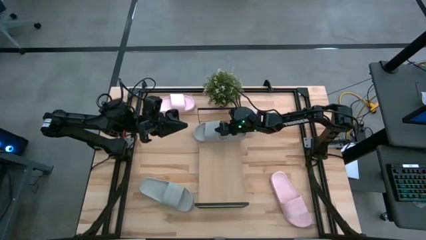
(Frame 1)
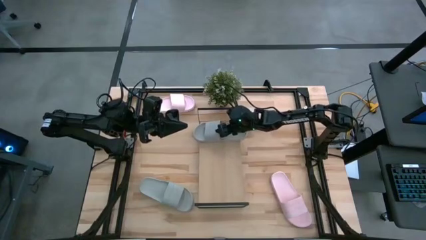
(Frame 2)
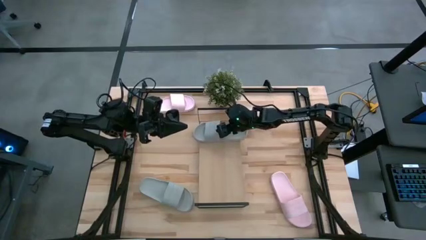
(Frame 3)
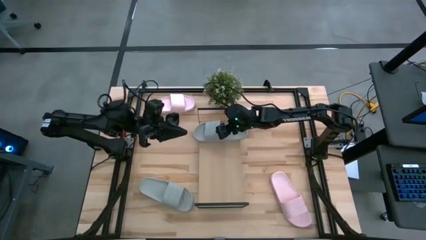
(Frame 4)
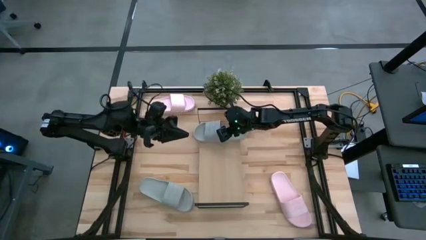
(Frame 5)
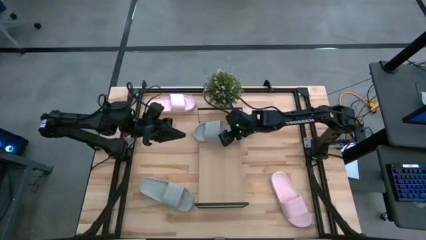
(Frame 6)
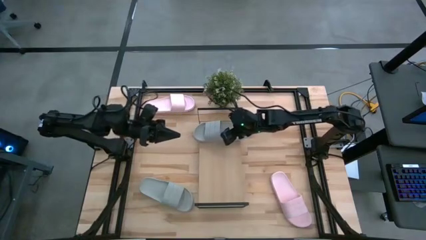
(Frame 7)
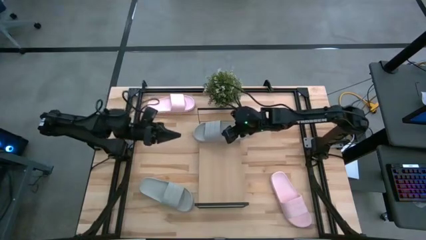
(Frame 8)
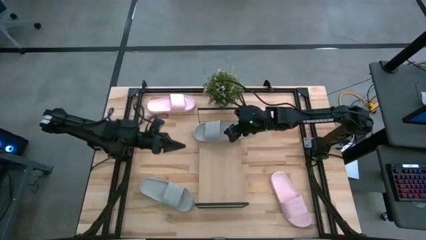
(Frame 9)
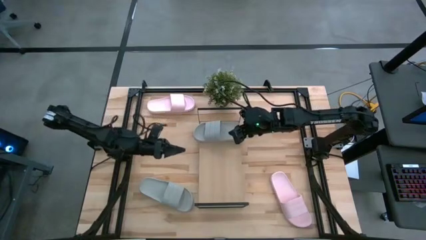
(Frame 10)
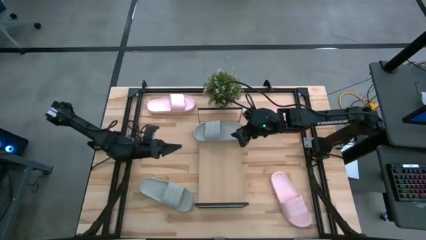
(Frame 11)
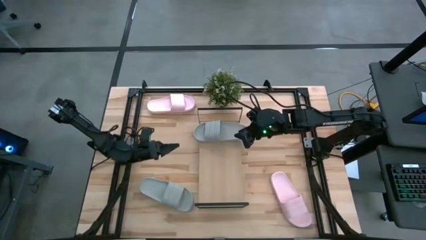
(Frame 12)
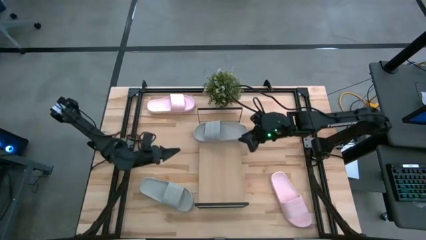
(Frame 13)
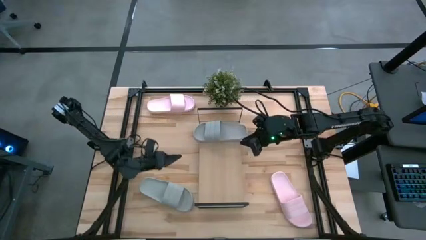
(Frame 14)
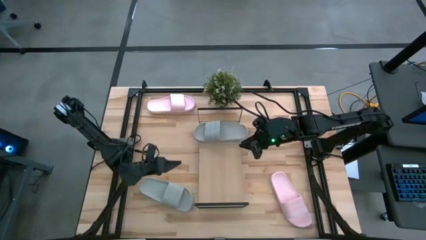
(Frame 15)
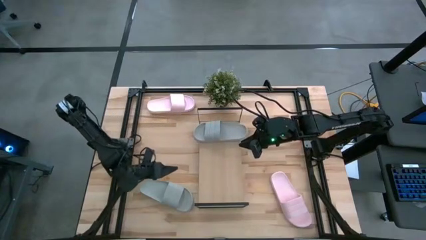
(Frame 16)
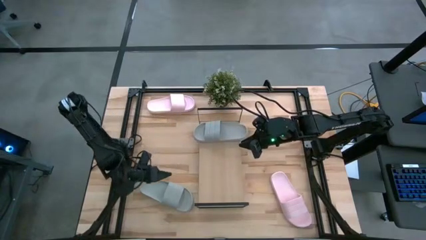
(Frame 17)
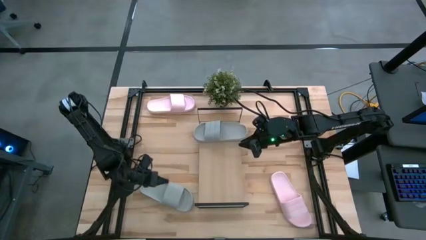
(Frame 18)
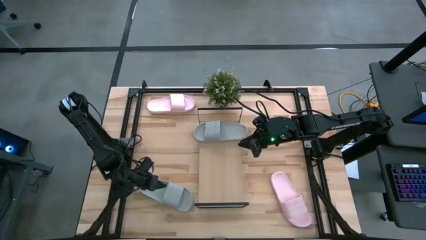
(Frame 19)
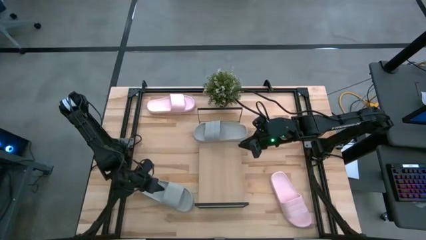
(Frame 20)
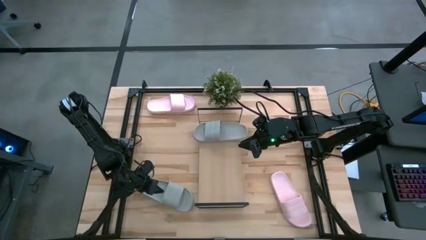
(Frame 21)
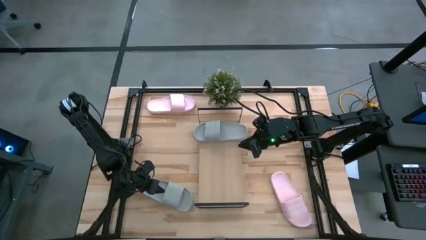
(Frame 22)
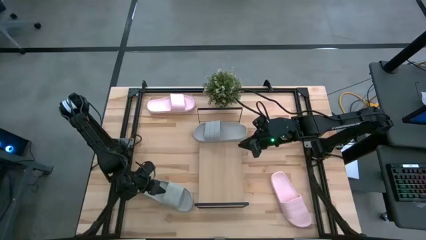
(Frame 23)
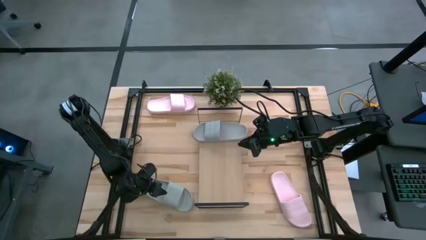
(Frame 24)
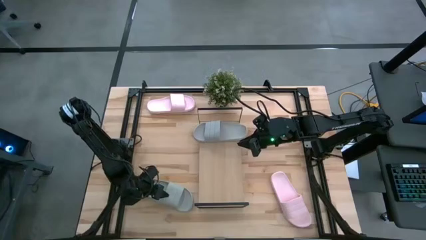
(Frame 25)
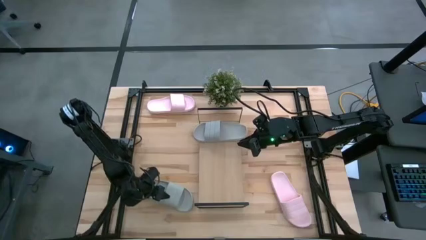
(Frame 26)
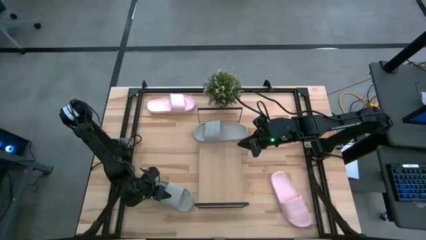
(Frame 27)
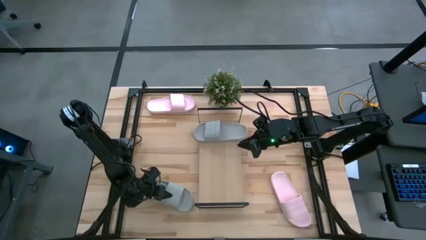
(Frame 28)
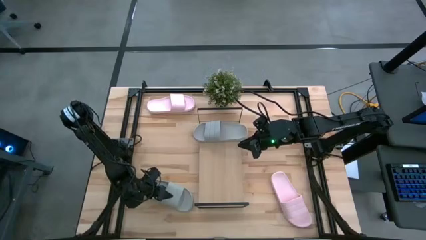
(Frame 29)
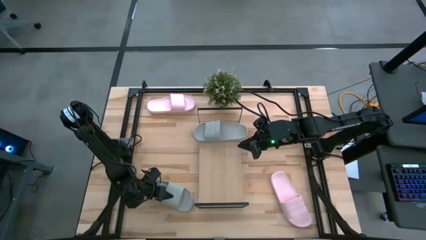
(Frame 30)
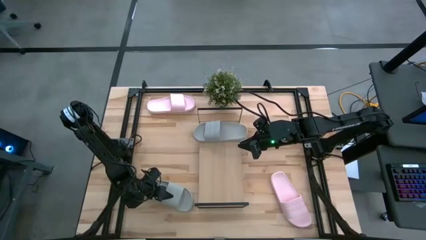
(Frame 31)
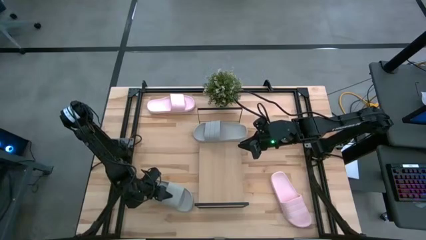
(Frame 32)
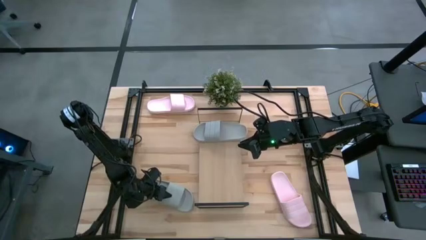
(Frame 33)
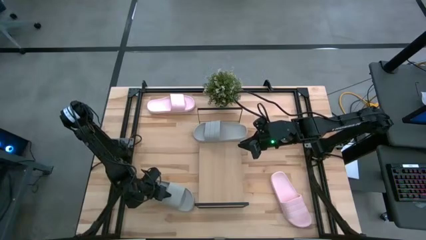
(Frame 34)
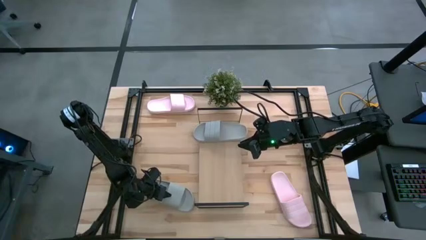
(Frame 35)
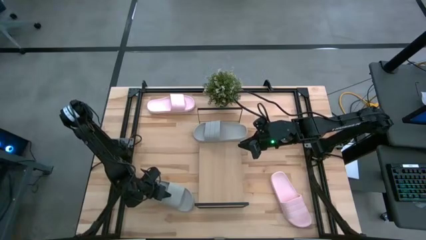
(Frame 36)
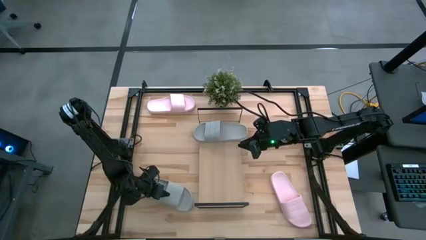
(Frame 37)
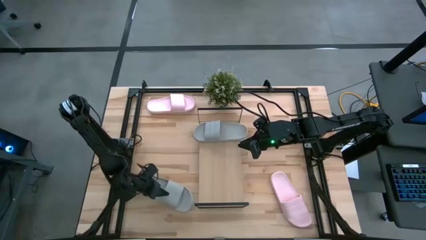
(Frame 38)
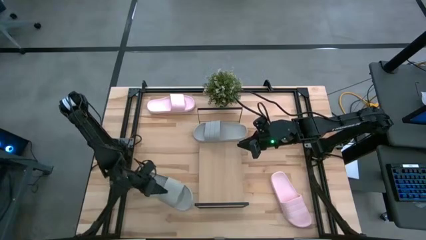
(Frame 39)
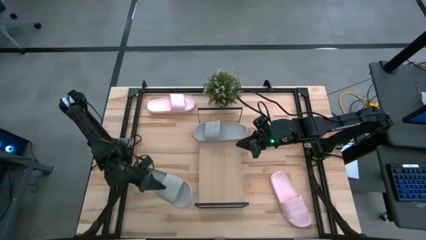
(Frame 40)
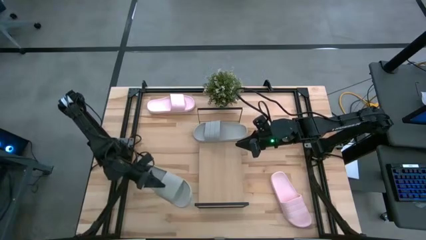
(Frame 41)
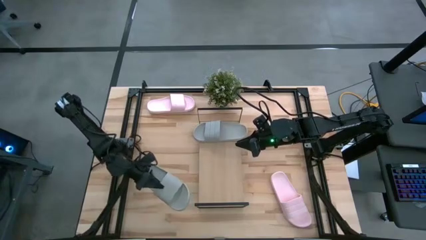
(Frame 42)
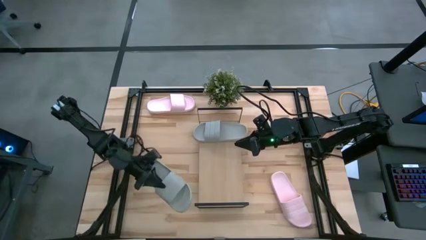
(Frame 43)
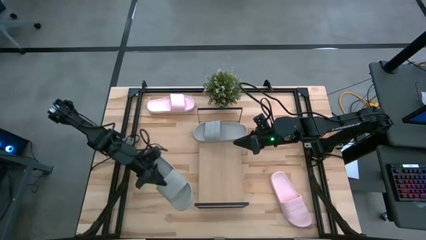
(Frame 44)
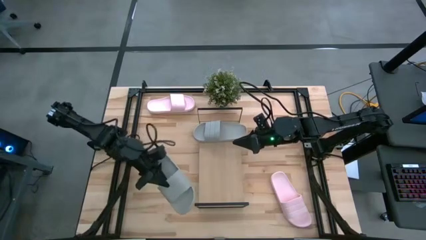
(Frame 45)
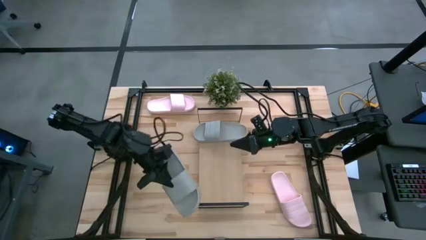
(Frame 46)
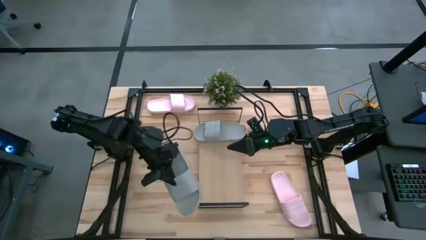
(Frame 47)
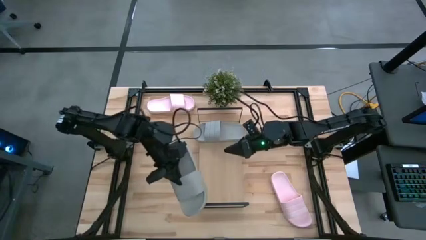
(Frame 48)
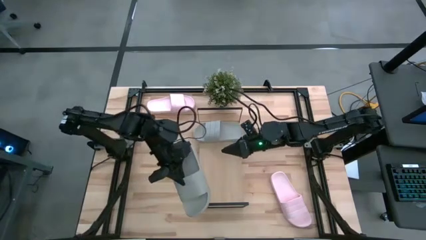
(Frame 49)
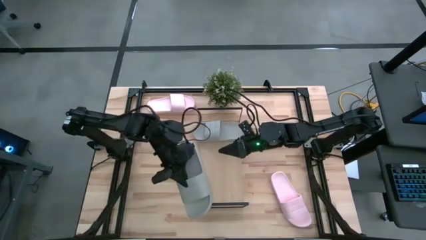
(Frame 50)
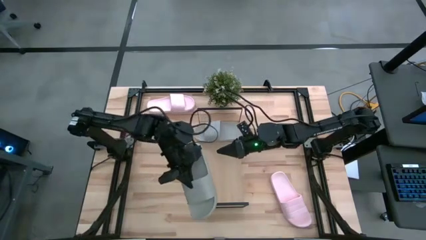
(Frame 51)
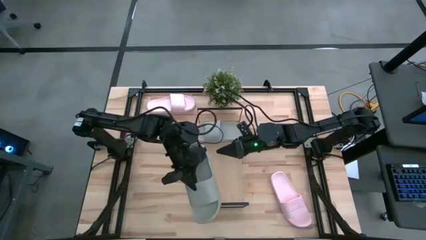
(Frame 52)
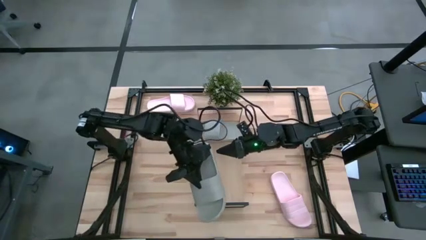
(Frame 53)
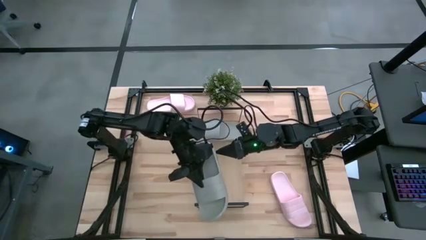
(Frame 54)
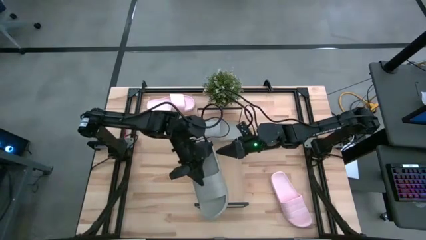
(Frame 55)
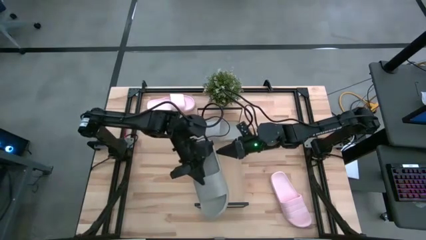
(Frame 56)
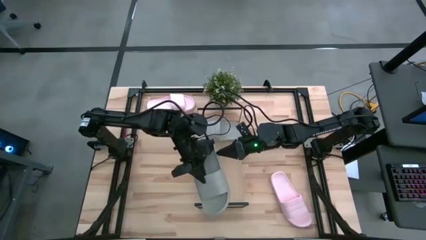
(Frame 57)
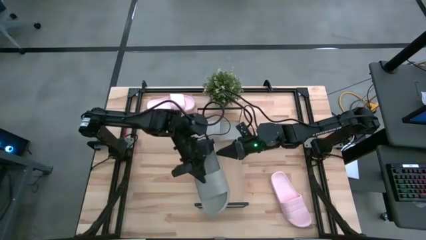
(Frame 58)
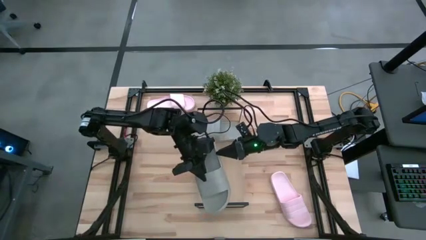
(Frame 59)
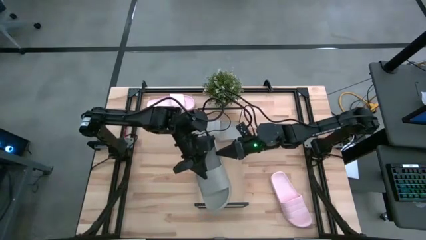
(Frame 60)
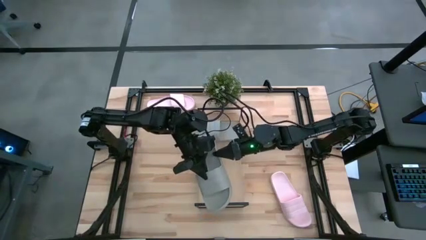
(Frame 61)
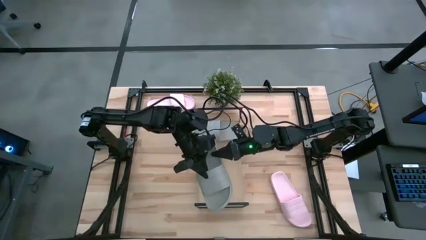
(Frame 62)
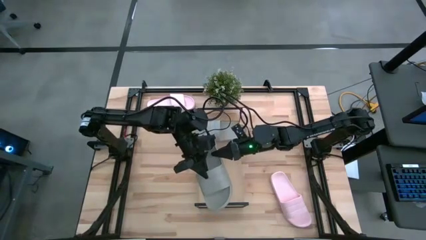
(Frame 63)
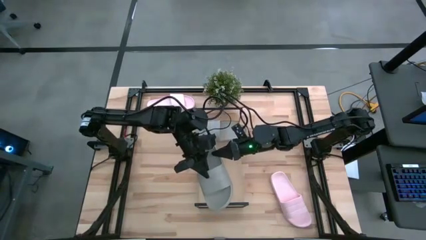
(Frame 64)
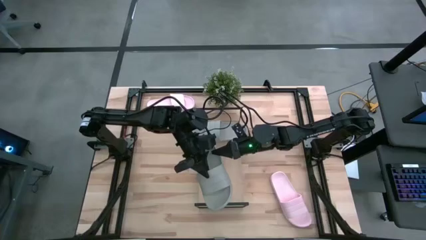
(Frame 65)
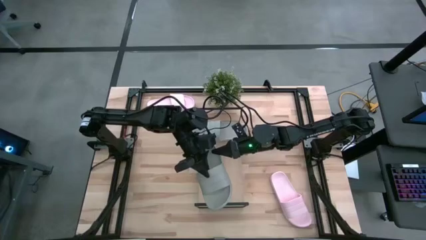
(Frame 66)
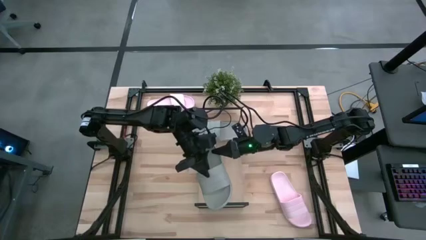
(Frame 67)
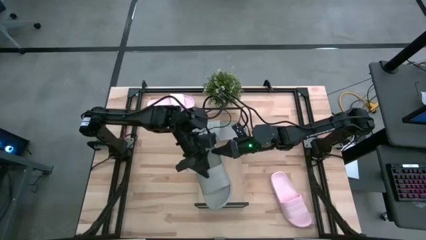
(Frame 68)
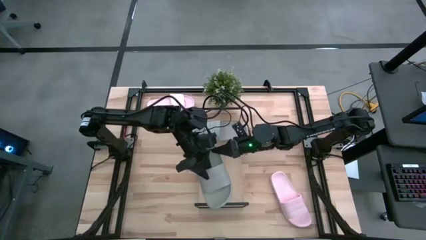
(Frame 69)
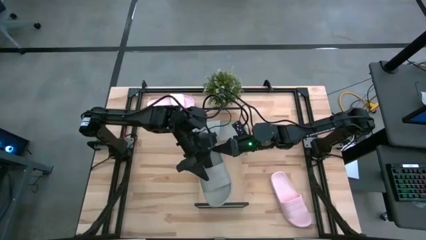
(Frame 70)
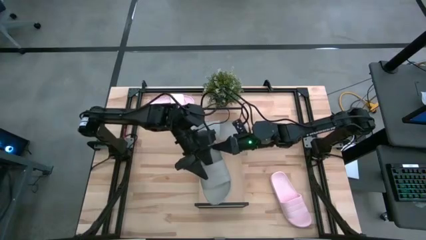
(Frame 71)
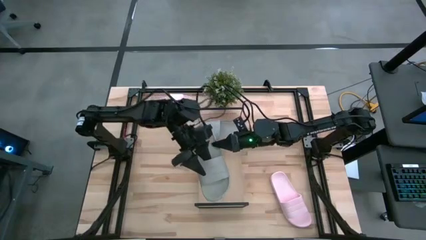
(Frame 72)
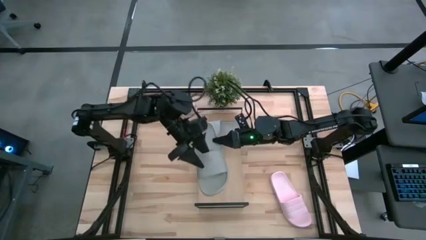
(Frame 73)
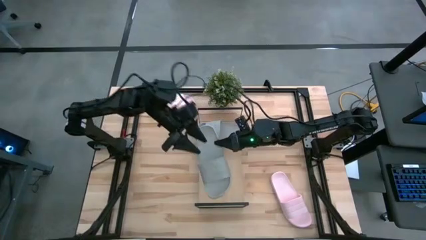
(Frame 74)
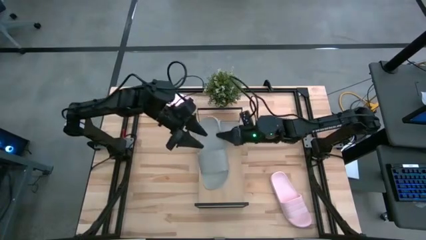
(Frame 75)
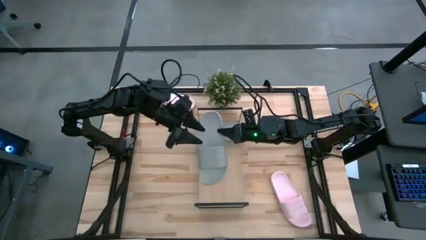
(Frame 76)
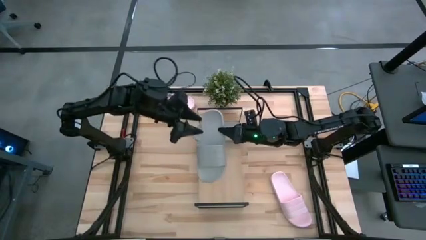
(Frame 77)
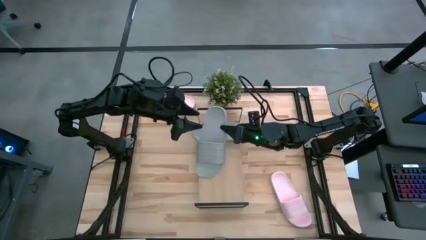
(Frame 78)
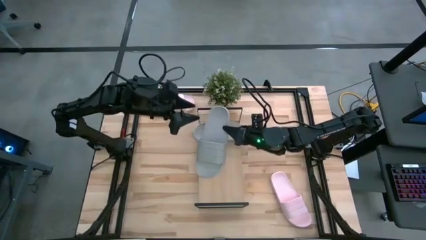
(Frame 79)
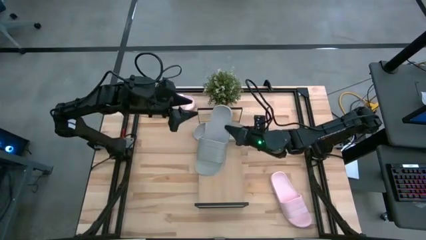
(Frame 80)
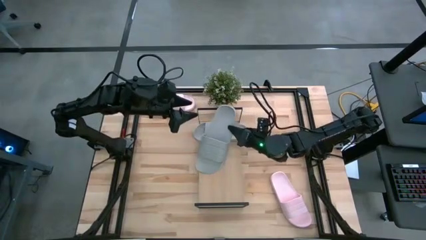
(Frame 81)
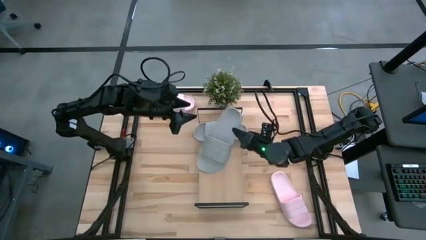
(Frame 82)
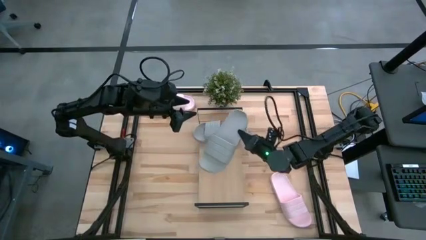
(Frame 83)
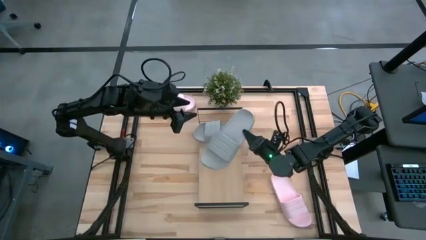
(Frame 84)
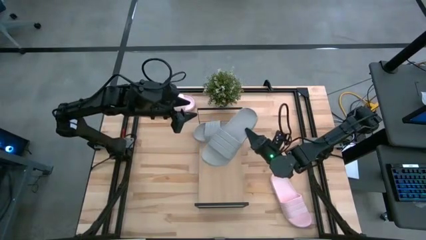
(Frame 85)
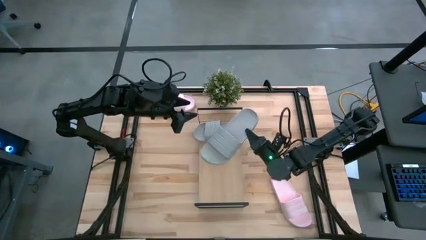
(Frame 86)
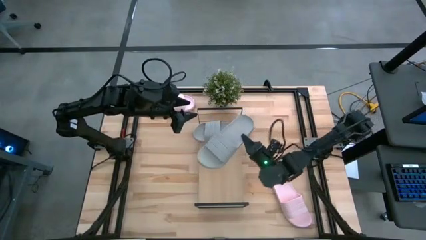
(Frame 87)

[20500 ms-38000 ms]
Task: Pick and place slides into the shelf
Put the gray slide on the shelf

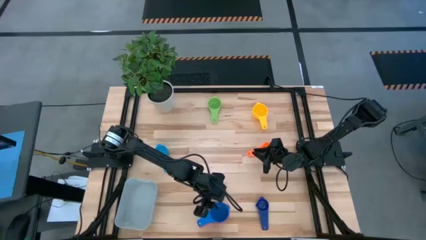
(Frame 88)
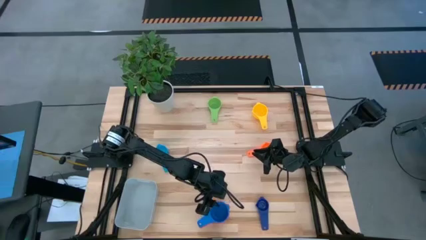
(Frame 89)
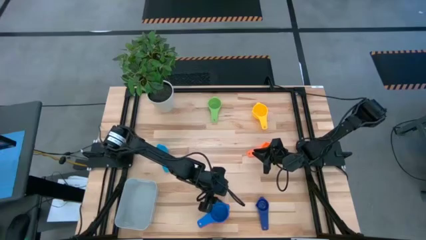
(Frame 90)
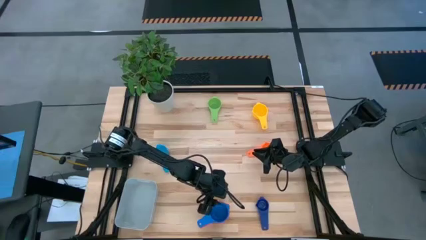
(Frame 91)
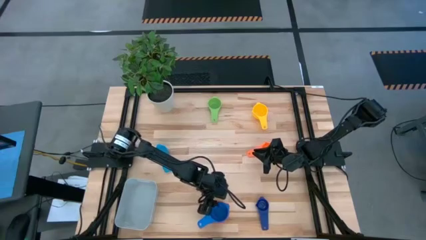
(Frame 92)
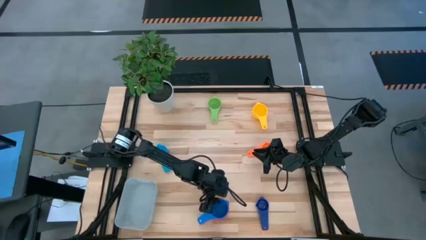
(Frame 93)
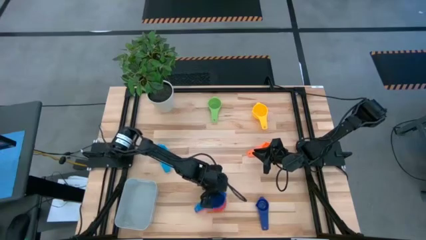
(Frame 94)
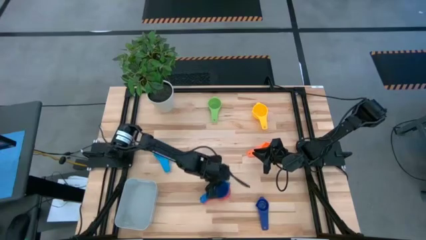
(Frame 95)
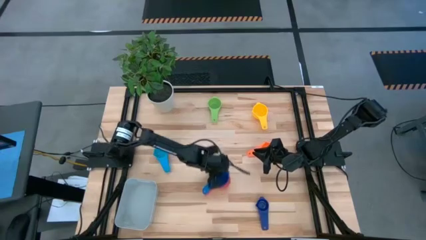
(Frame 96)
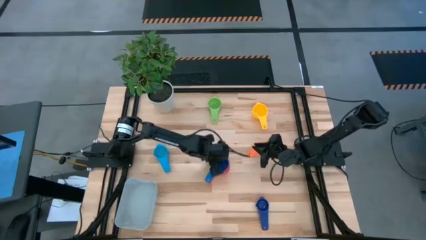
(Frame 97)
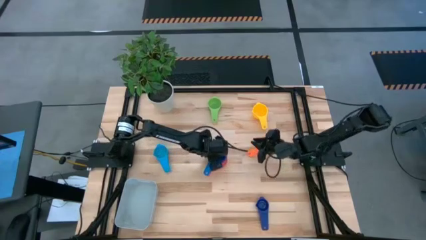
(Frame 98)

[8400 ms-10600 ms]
Task: Nest measuring cups in basket
Adjust the stacked measuring cups
